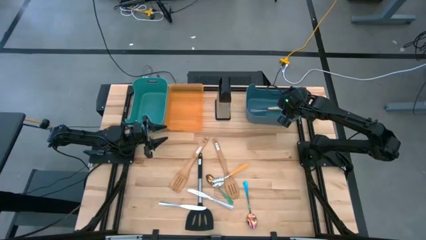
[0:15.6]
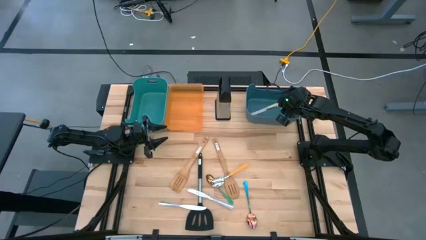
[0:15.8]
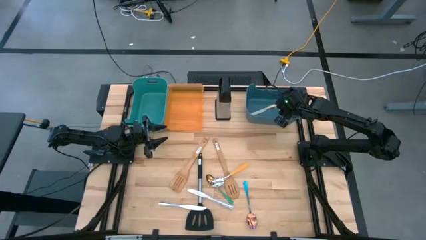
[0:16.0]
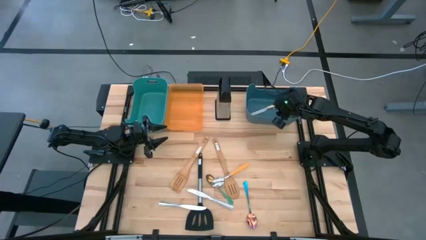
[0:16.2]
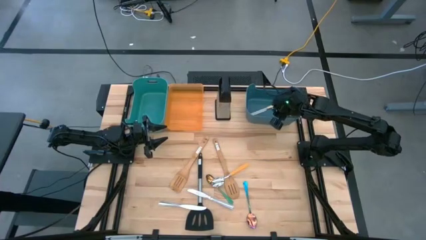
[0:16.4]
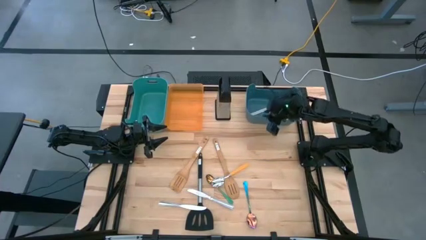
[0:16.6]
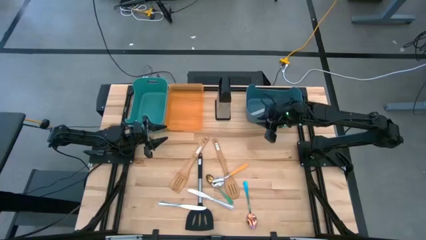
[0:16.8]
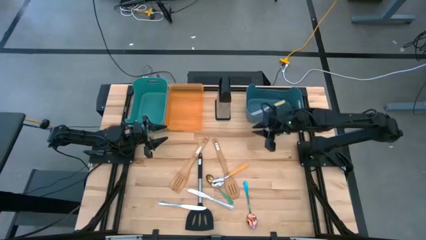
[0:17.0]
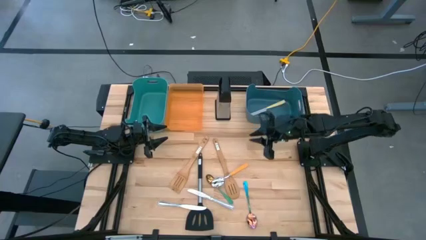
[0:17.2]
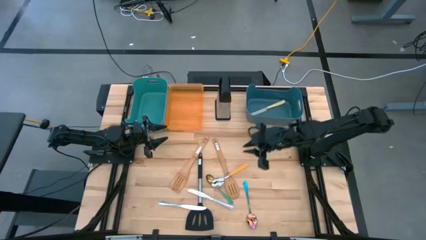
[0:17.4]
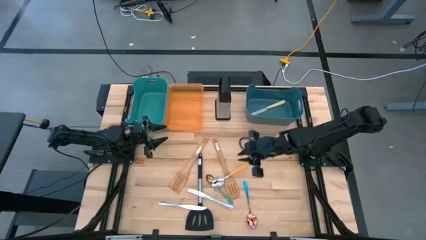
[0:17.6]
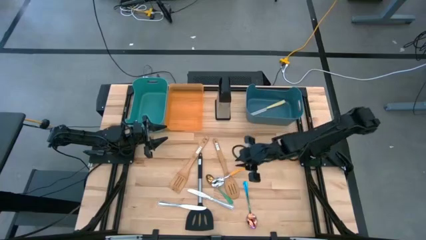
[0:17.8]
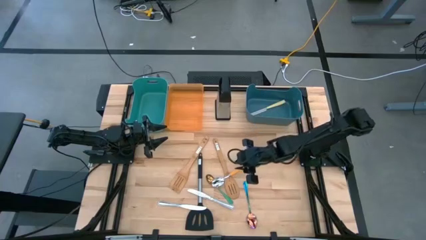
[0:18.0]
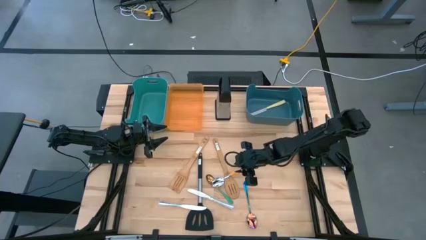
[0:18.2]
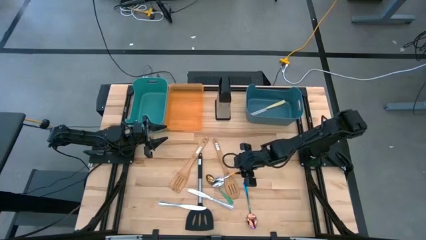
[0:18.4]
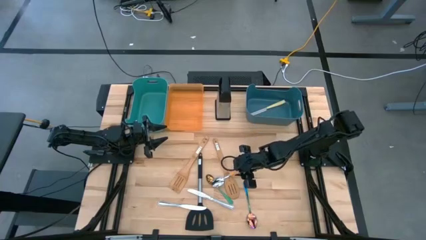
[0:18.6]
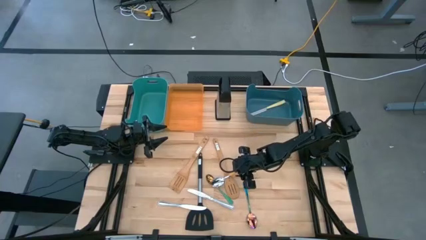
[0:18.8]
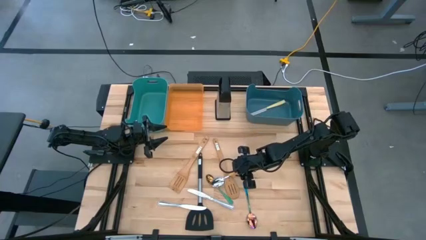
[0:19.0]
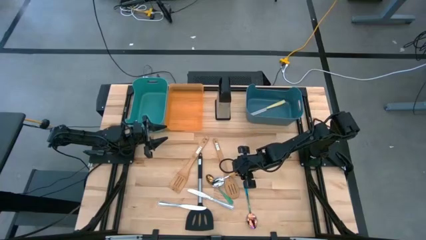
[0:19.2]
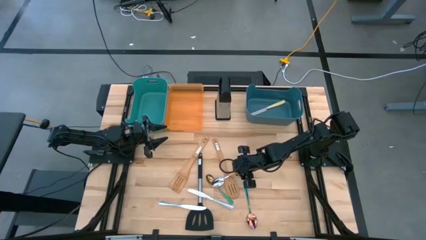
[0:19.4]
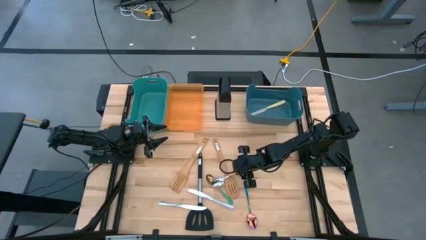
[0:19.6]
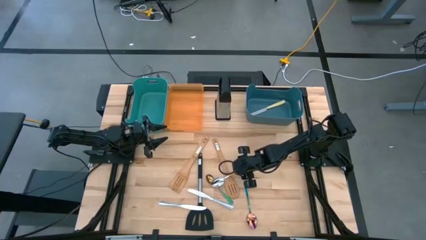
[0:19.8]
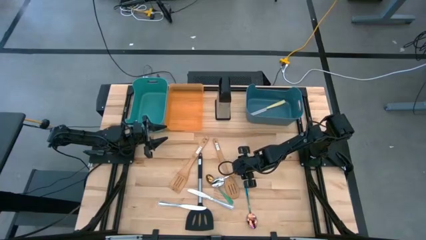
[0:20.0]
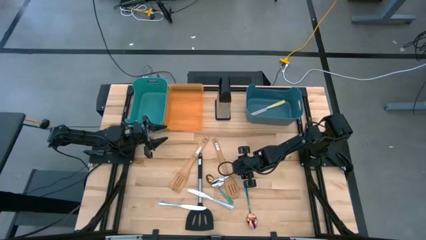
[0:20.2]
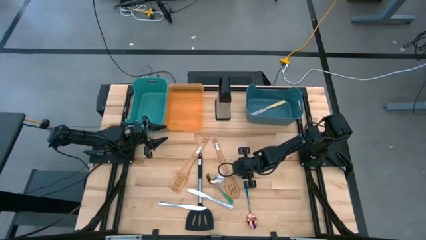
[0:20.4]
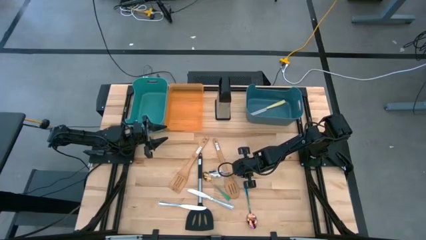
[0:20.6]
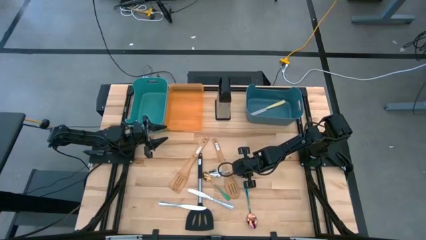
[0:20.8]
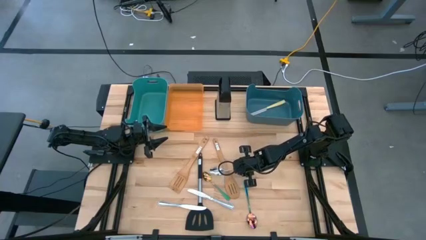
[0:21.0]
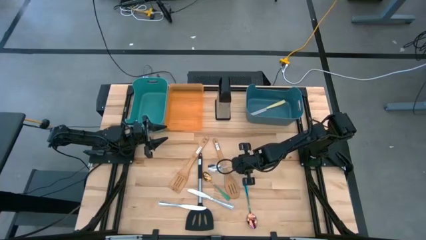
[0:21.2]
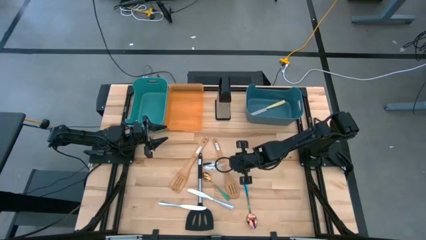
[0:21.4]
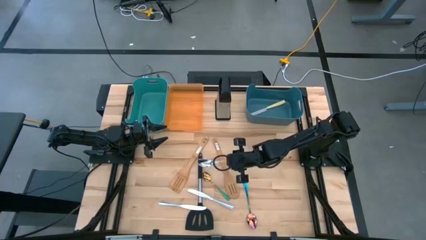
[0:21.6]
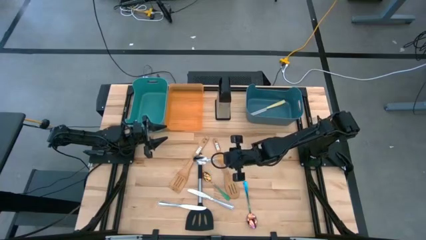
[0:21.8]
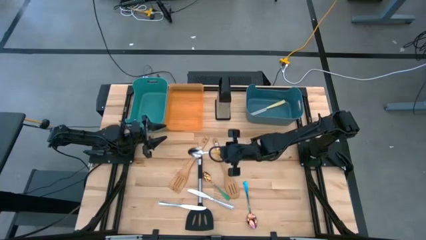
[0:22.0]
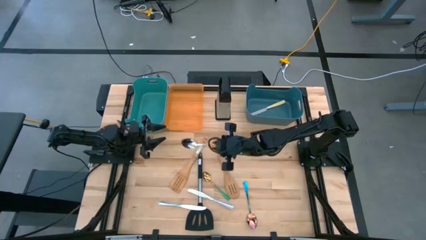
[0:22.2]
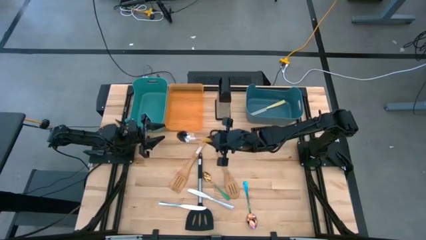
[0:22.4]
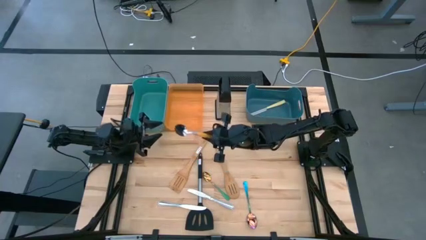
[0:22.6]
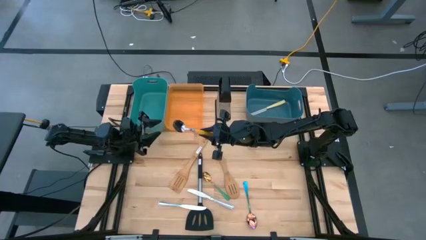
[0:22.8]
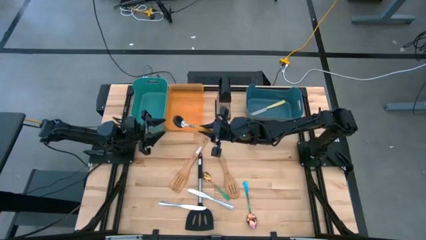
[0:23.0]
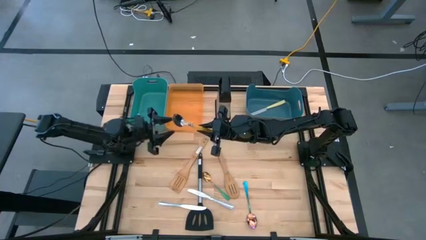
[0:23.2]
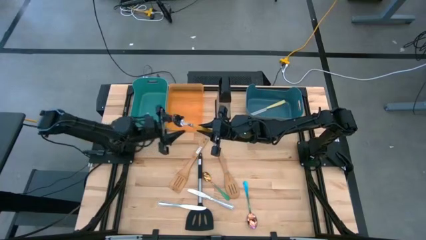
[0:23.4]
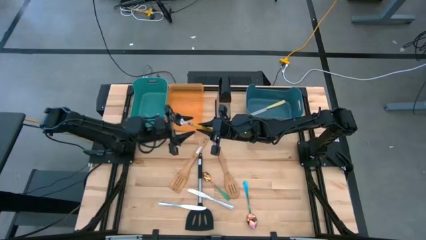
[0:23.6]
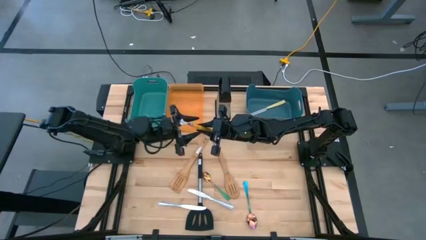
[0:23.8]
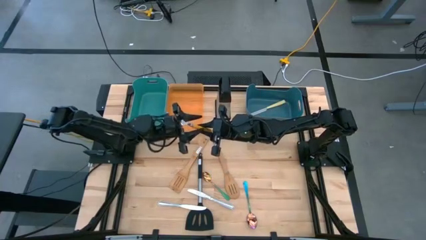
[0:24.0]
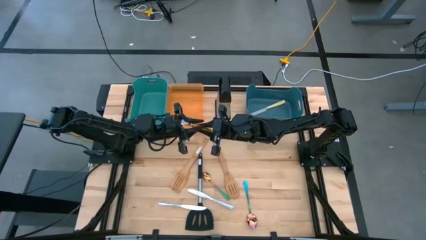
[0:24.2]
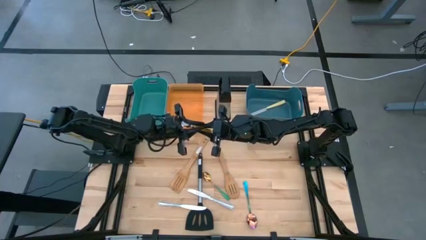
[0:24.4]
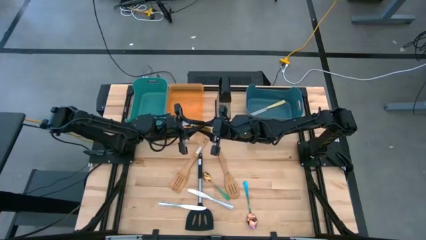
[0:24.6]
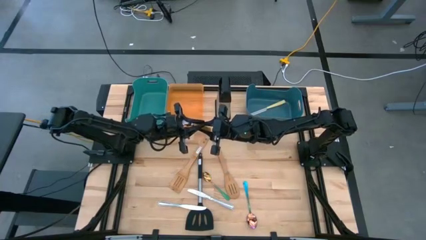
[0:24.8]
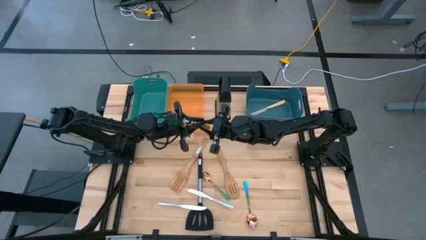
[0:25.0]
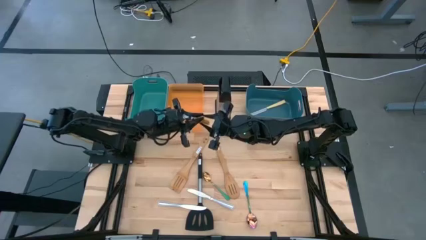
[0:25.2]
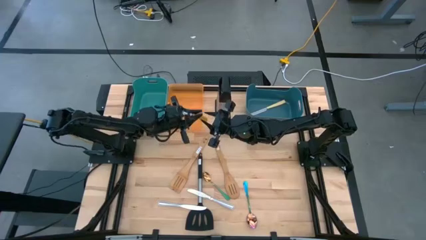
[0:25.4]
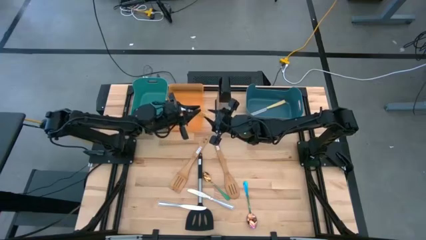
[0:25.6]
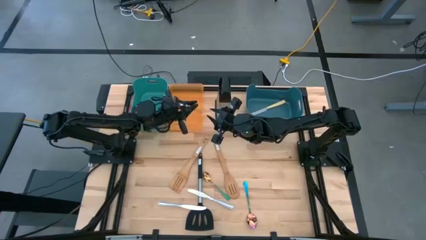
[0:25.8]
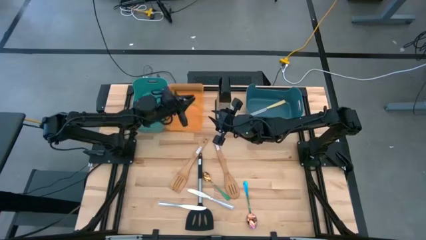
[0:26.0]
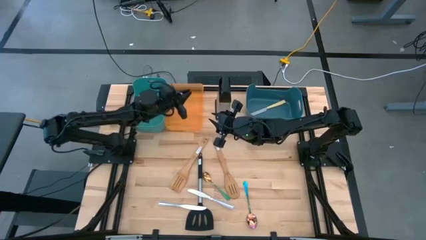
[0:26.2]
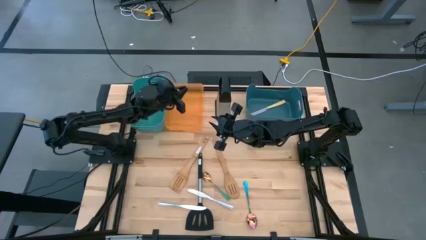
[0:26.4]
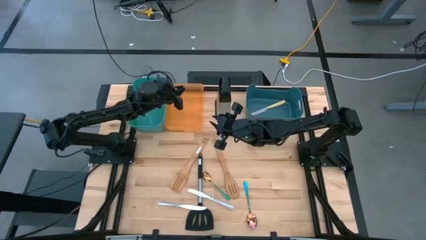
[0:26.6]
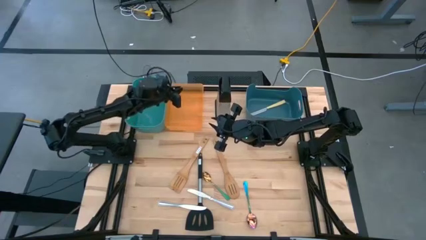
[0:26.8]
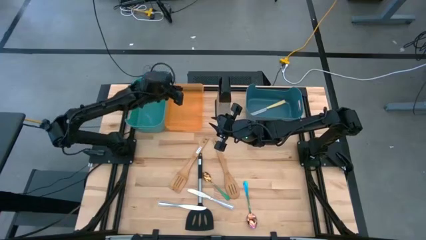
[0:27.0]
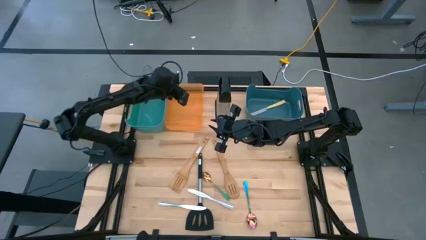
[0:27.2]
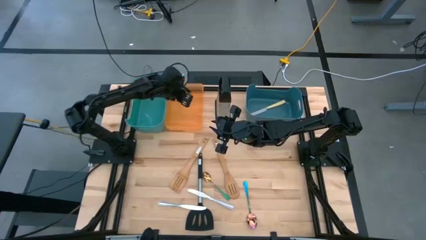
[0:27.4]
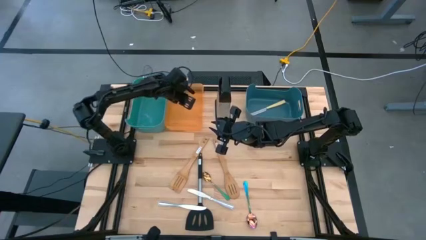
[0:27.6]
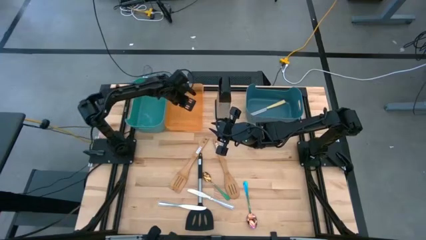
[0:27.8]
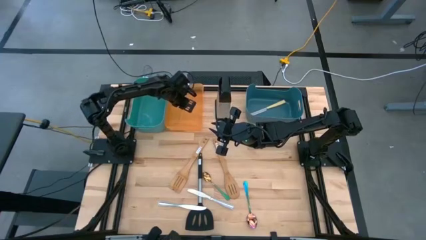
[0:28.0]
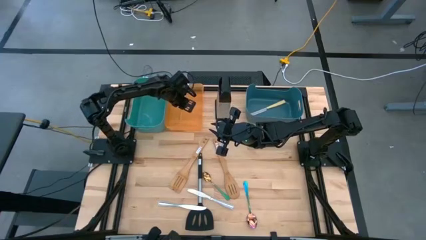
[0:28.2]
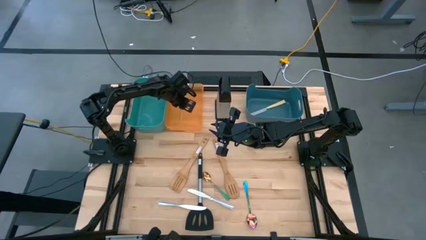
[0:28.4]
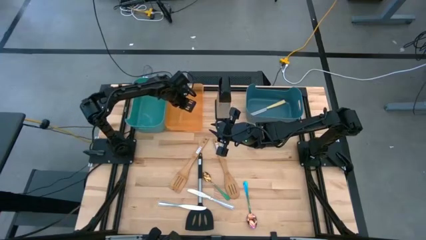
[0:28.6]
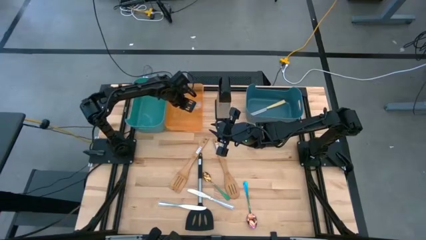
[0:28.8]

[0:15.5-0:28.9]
Task: Pick & Place Kitchen Items
Put the orange spoon into the orange bin
